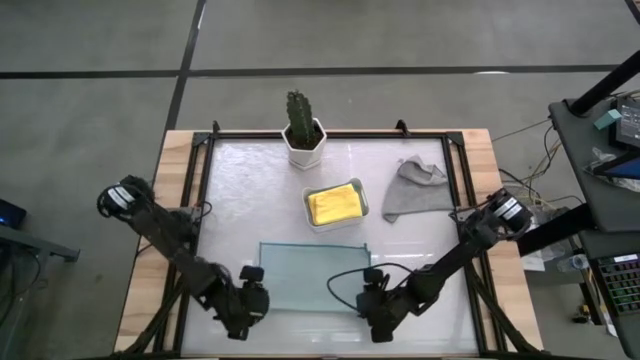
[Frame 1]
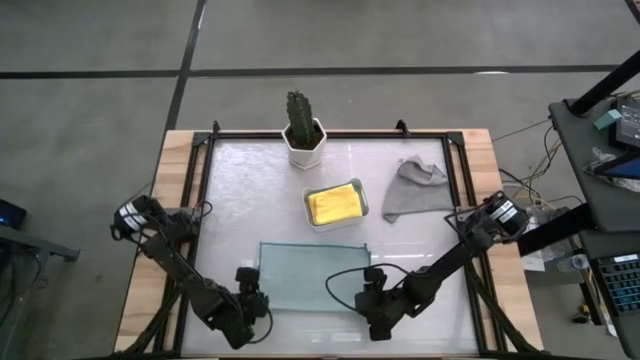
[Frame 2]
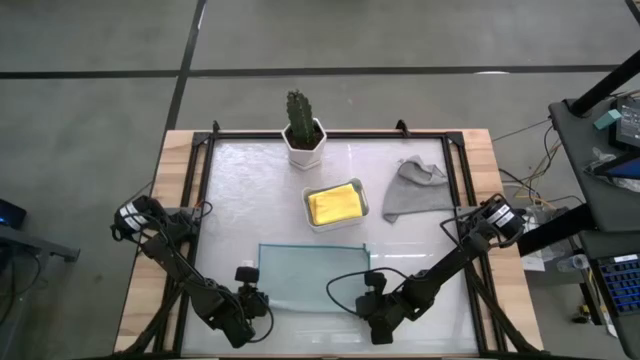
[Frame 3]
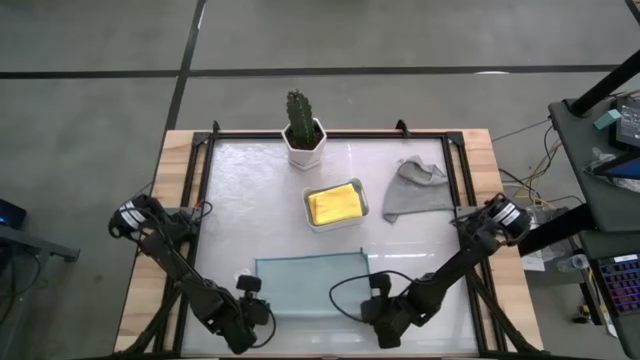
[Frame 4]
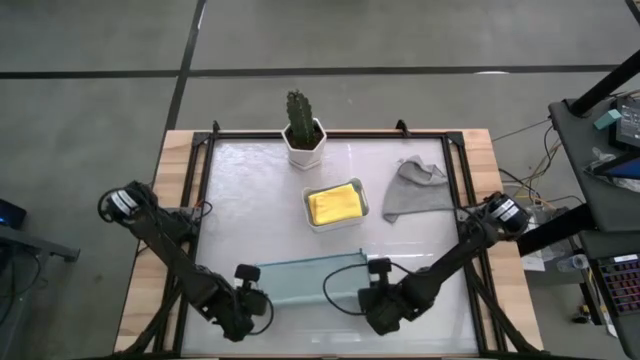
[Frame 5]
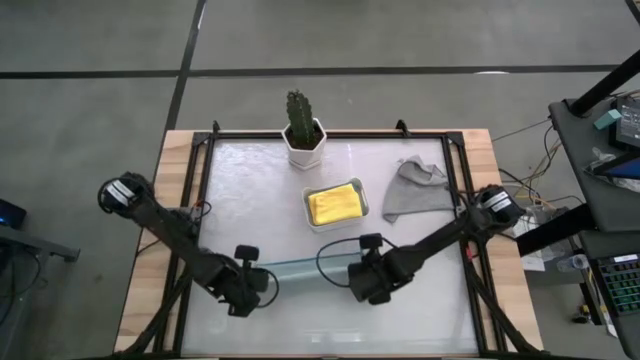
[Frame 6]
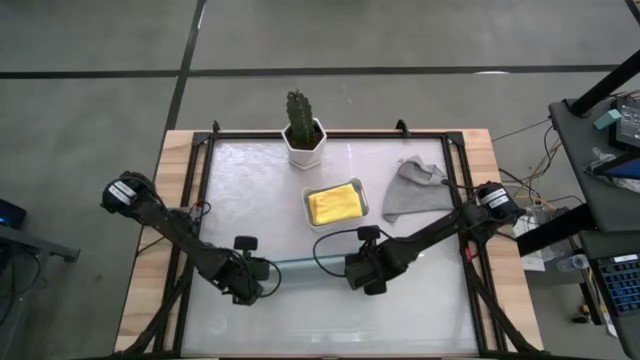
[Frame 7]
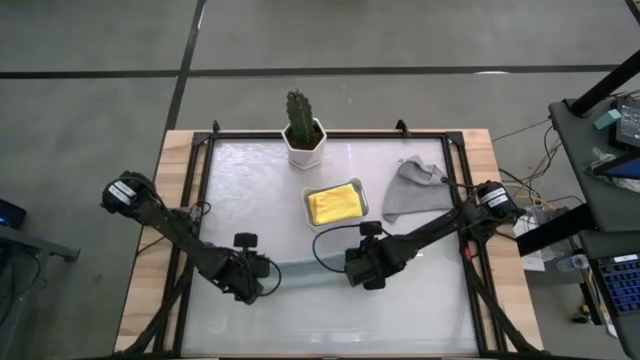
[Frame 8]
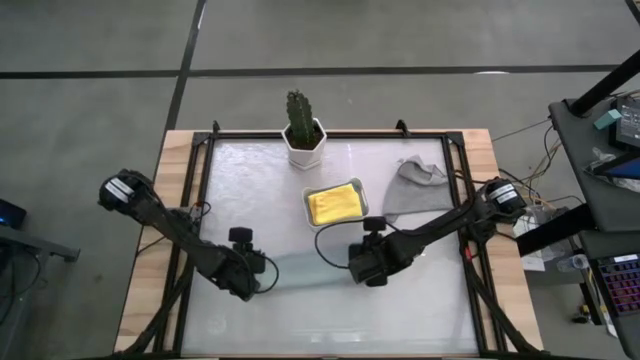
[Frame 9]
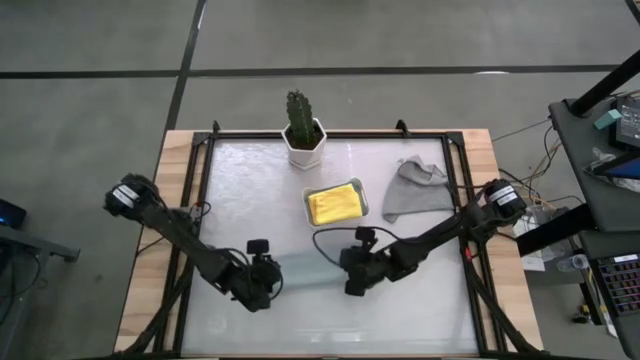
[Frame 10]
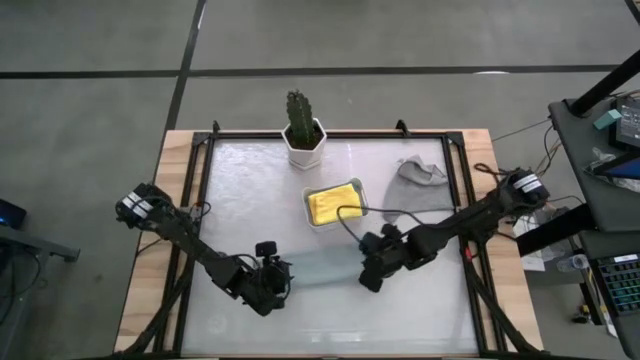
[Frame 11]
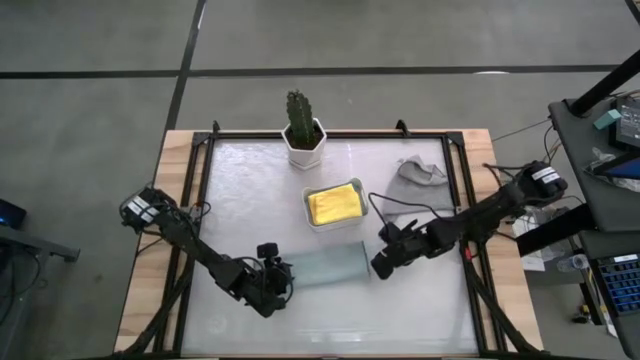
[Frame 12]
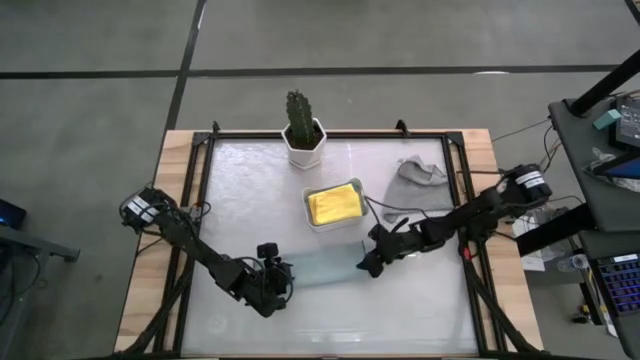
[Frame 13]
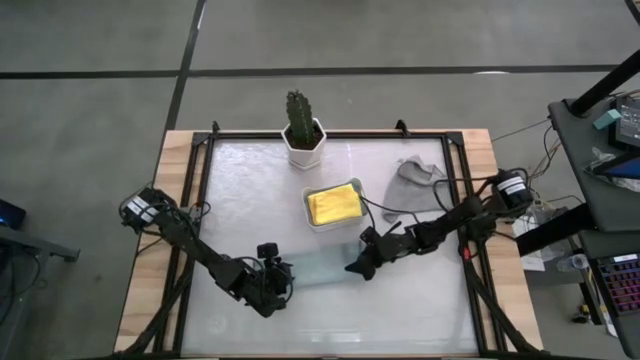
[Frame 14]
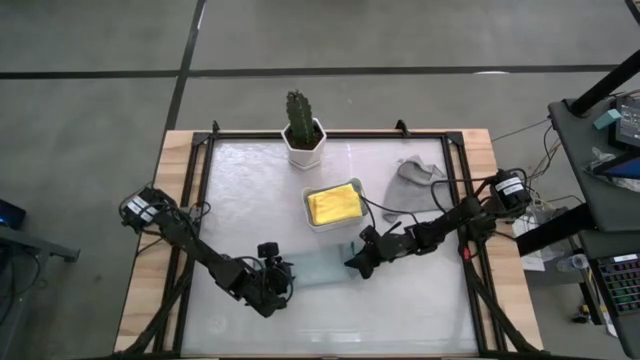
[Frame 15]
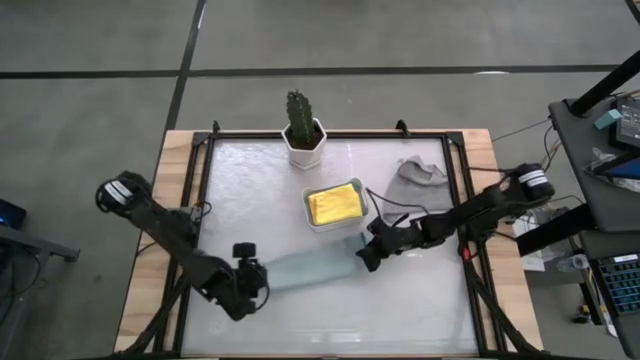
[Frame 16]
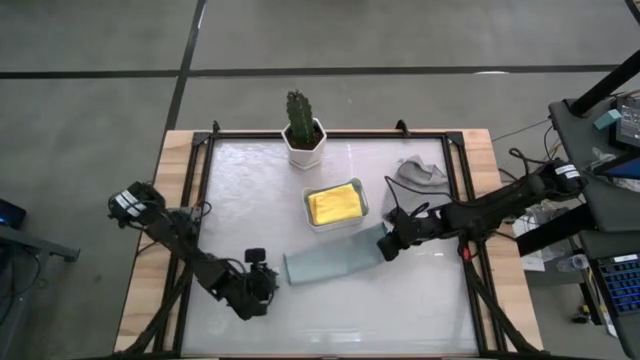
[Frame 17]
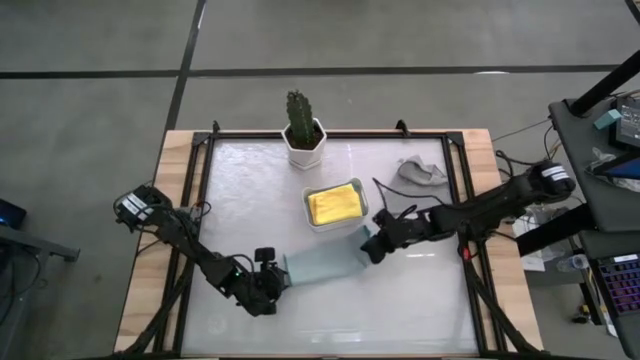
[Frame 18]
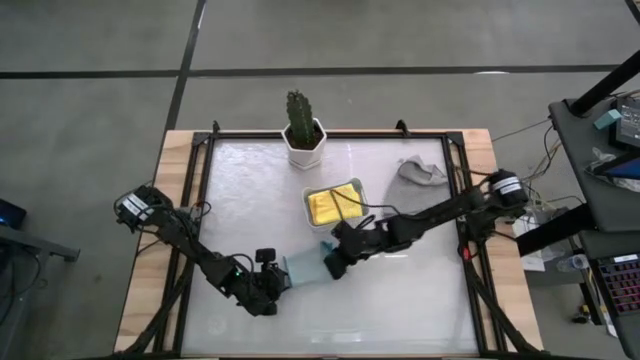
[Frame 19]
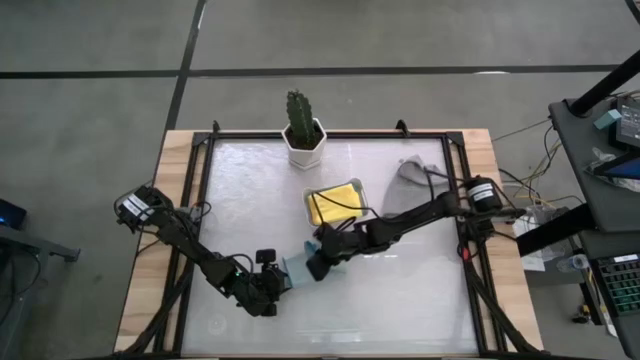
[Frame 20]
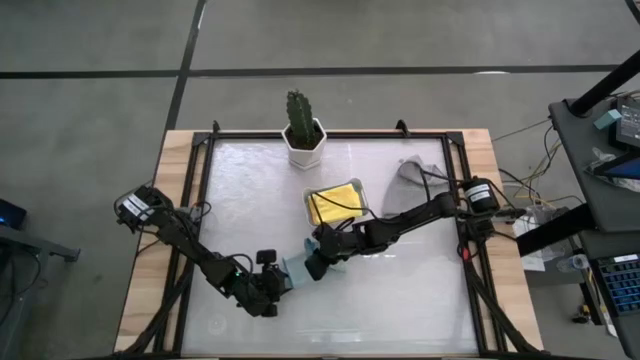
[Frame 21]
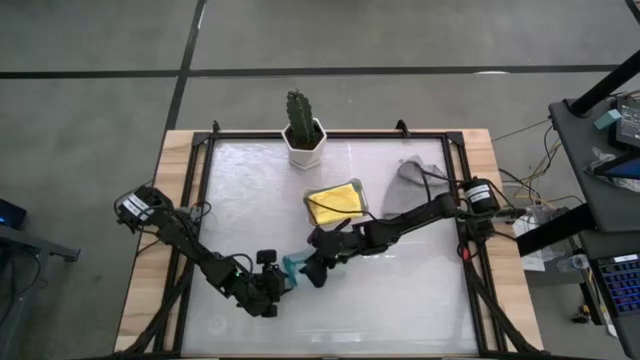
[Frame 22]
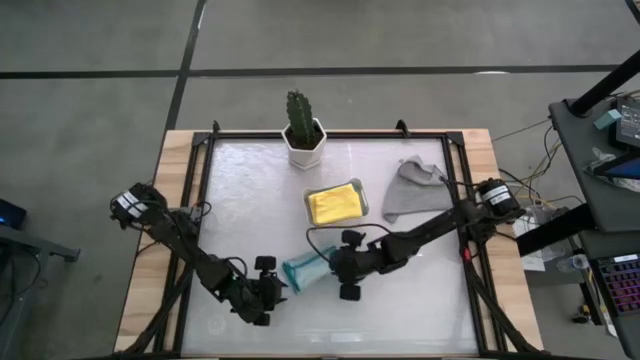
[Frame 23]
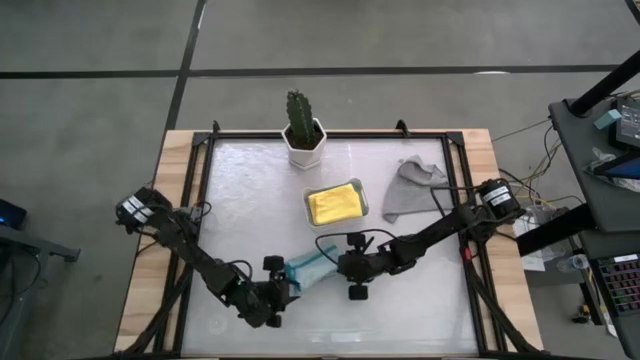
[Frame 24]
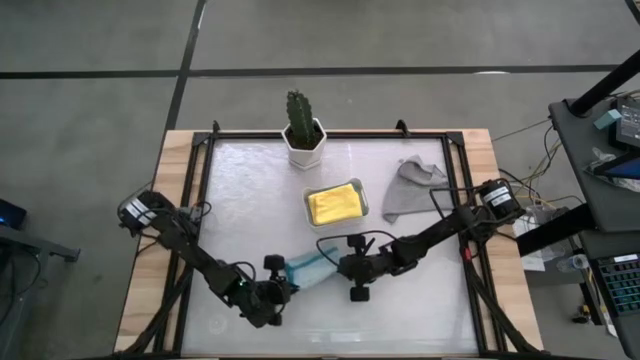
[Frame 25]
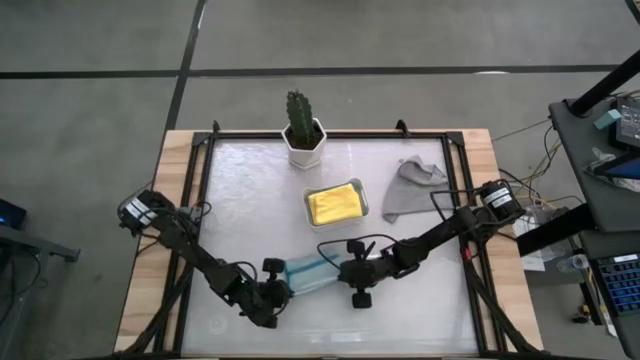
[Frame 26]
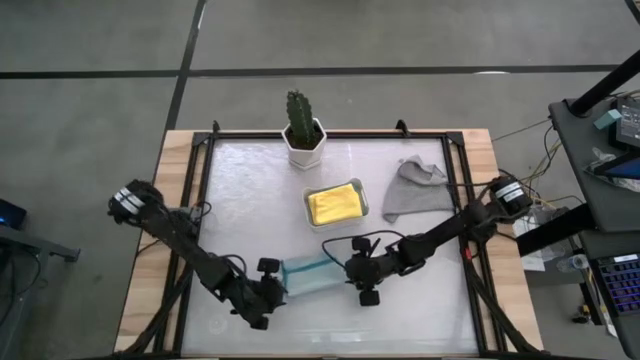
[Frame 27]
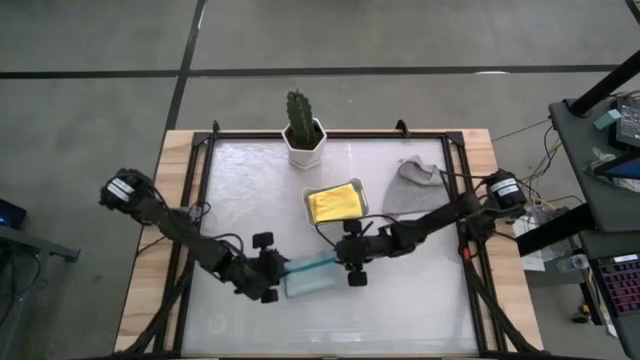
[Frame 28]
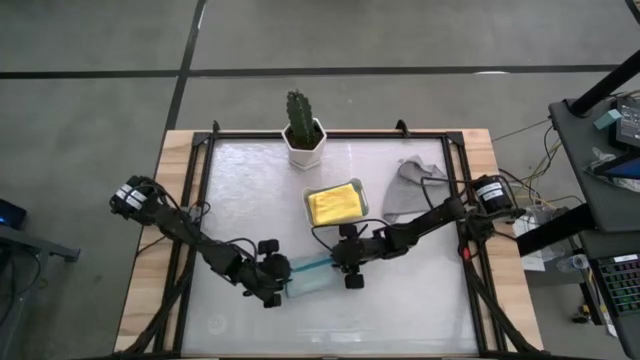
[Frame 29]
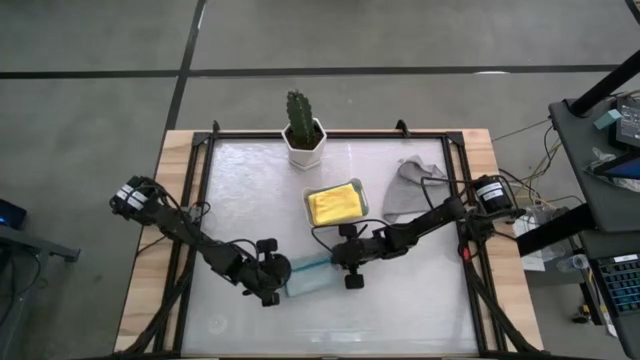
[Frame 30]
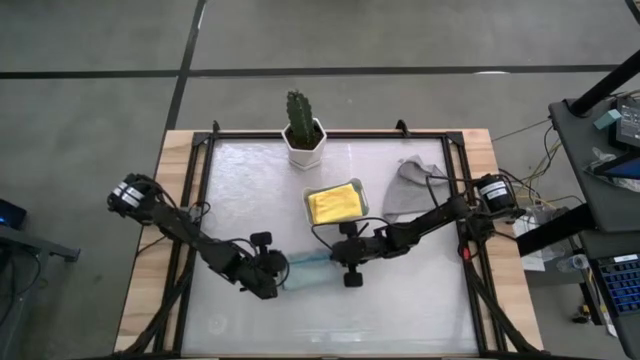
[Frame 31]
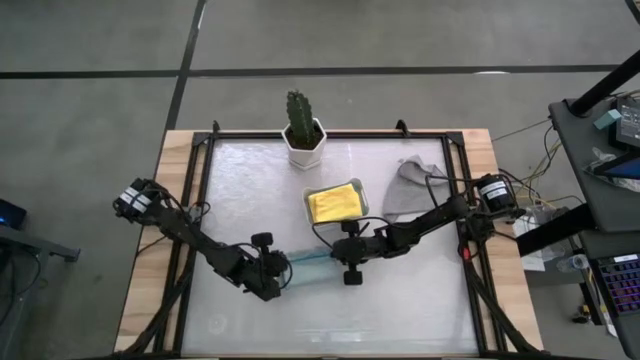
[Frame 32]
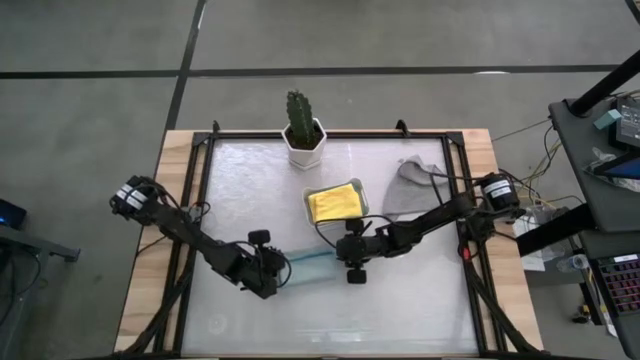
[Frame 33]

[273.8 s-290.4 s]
Task: Fold microfiber towels
Fold the light blue towel

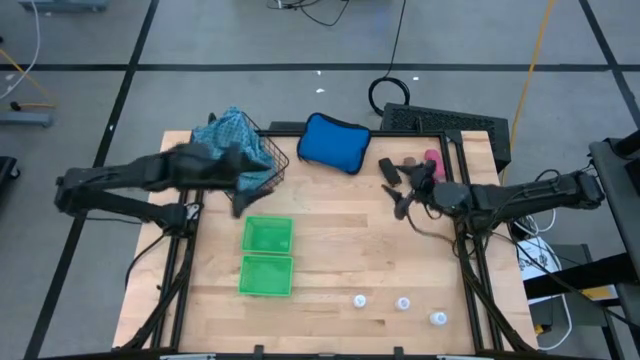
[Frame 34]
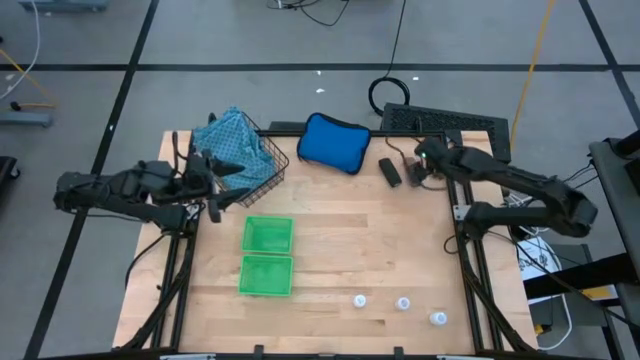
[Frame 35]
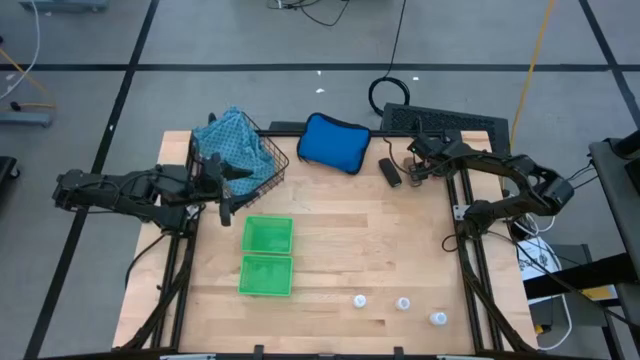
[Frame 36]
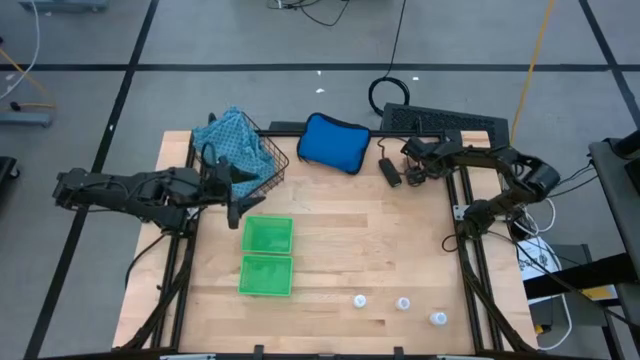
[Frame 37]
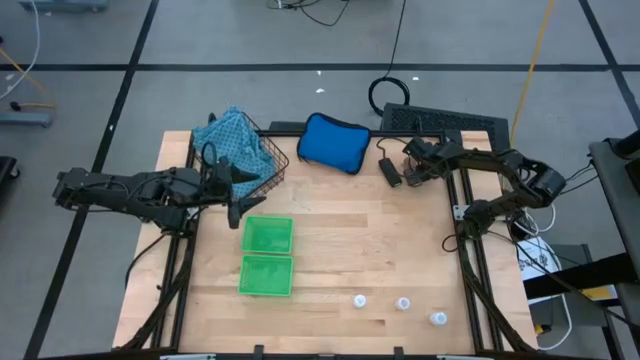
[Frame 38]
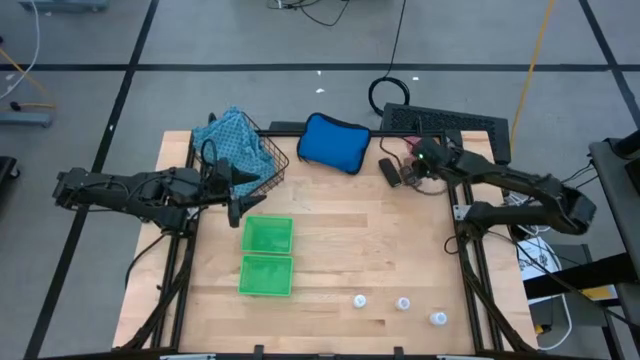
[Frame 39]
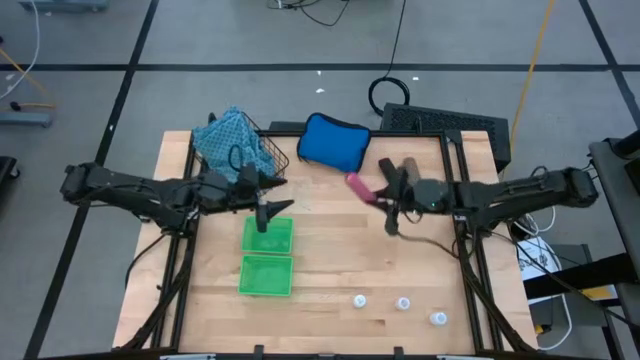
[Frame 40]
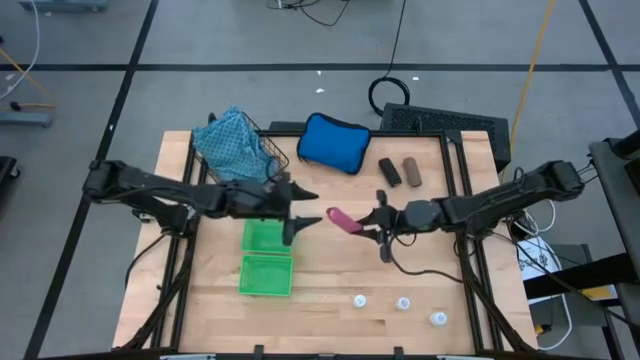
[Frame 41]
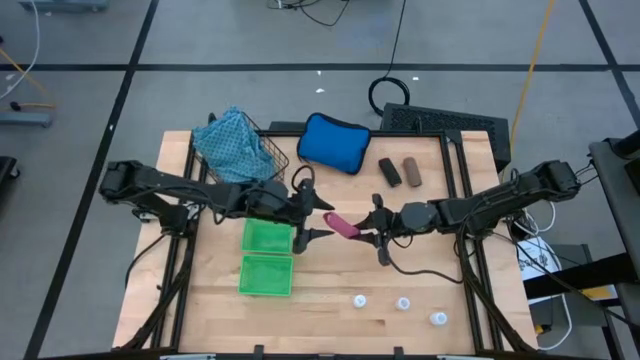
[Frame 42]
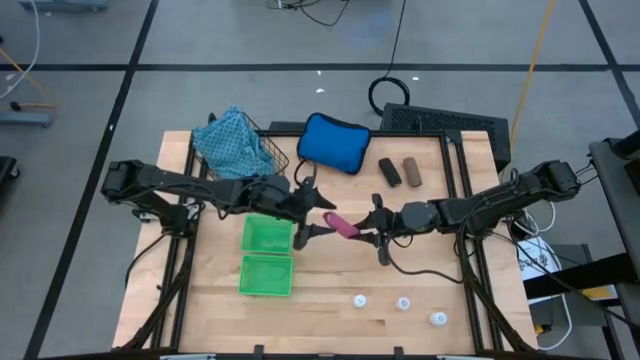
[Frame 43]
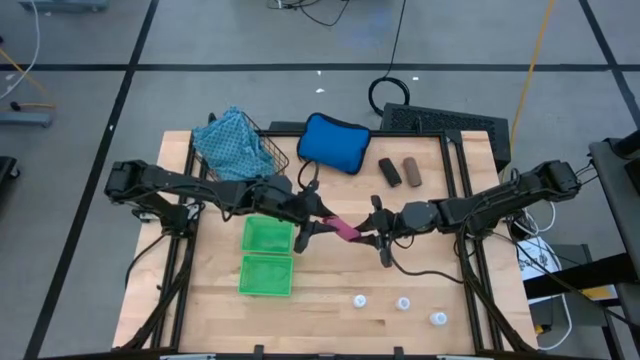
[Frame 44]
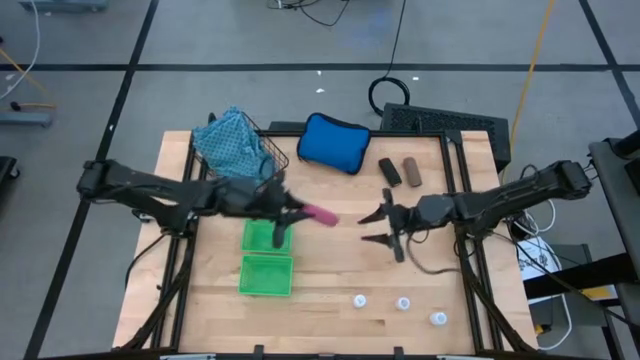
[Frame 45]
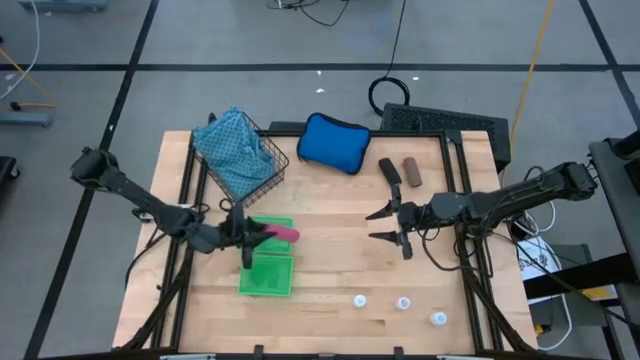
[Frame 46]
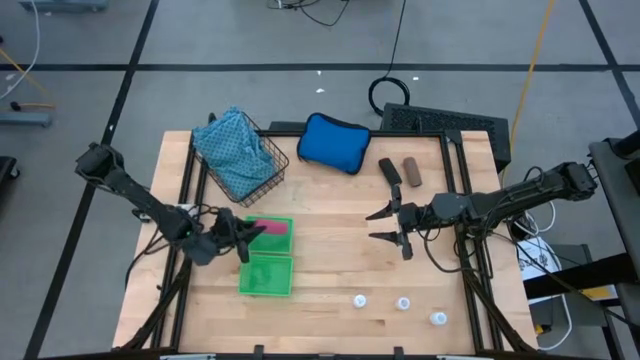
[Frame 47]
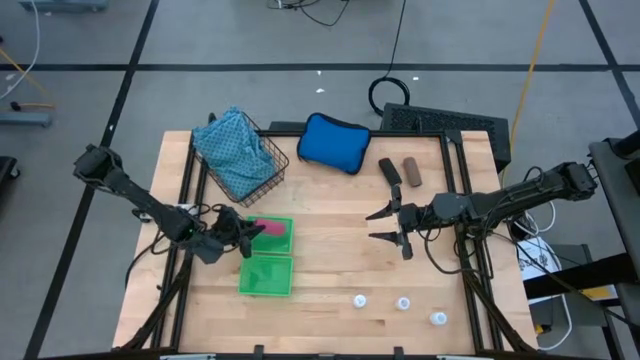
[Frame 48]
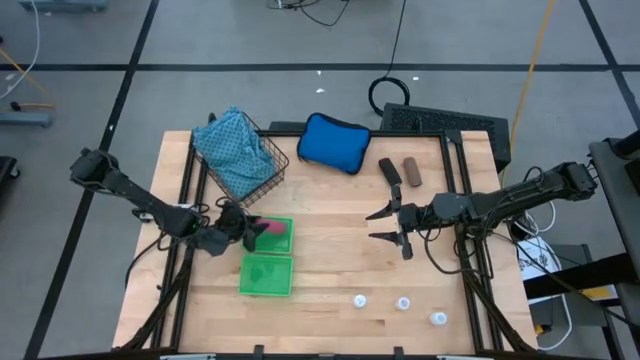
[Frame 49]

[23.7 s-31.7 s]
Task: Pick & Place Medicine items
Put the pink bandage into the top green basket
